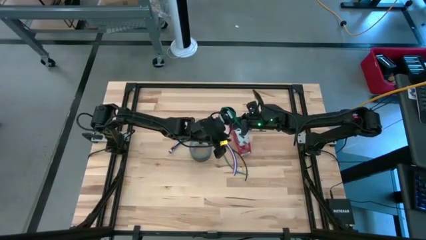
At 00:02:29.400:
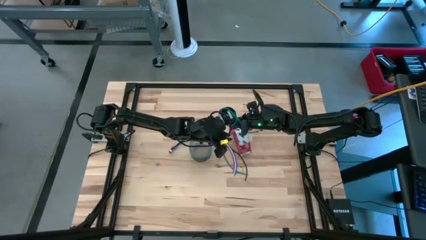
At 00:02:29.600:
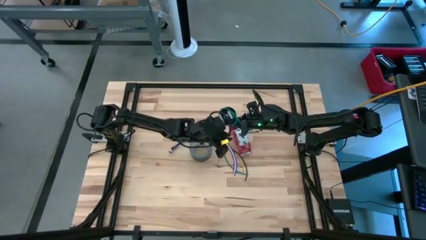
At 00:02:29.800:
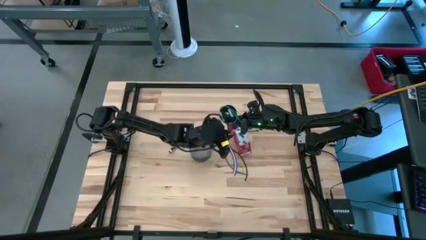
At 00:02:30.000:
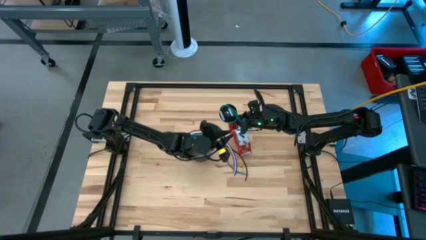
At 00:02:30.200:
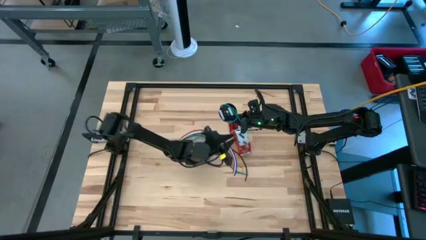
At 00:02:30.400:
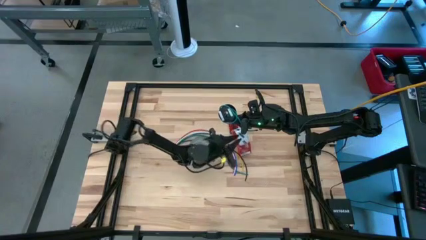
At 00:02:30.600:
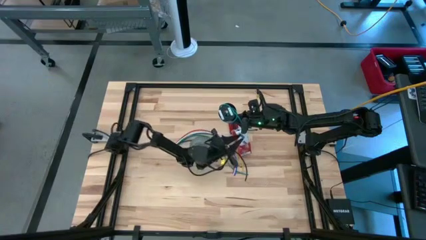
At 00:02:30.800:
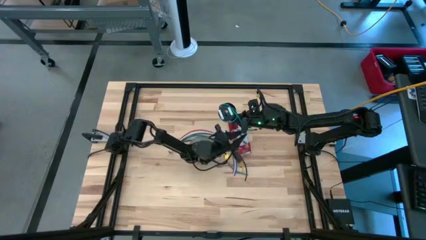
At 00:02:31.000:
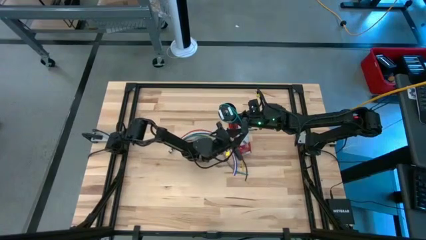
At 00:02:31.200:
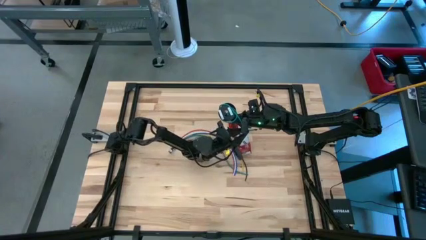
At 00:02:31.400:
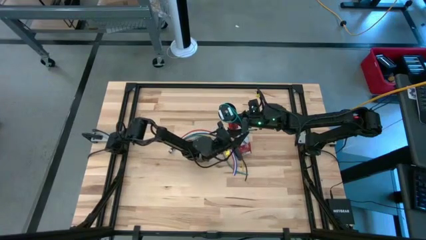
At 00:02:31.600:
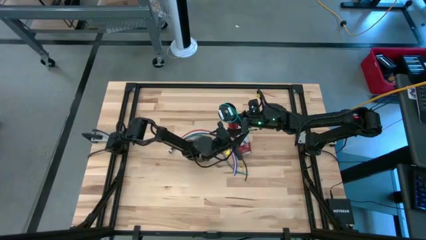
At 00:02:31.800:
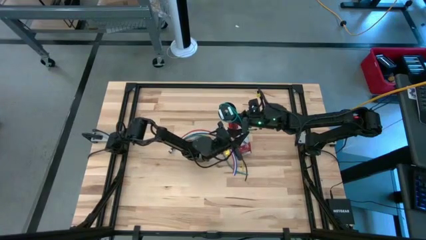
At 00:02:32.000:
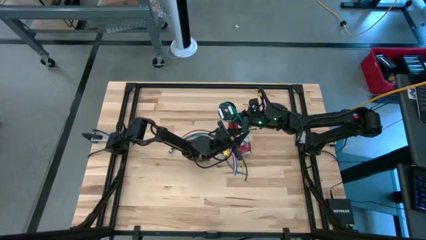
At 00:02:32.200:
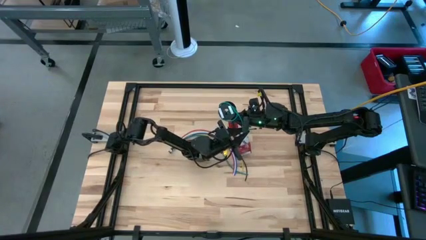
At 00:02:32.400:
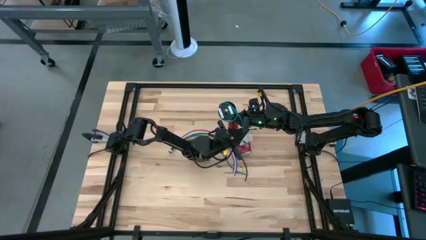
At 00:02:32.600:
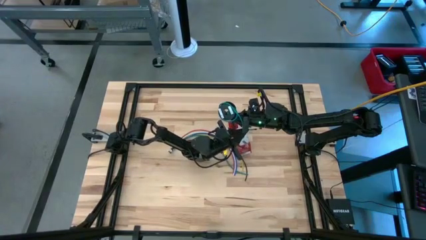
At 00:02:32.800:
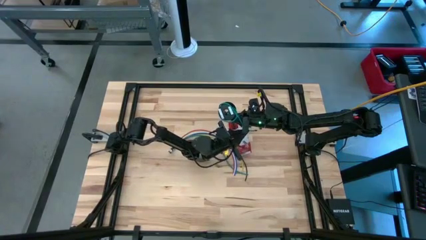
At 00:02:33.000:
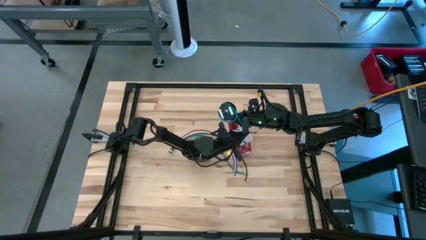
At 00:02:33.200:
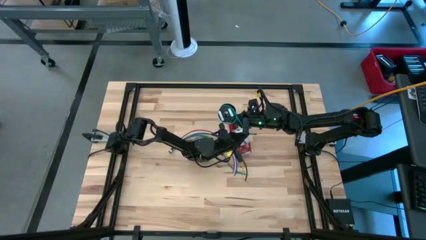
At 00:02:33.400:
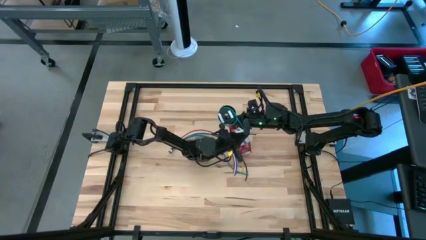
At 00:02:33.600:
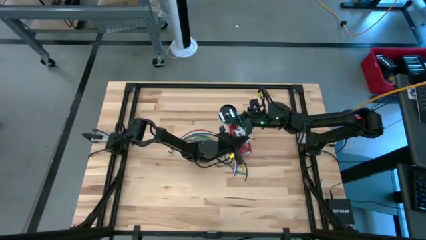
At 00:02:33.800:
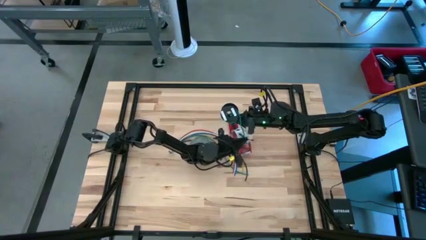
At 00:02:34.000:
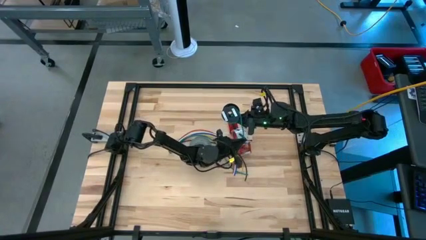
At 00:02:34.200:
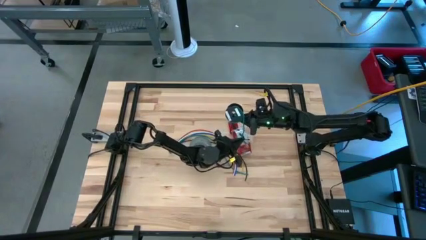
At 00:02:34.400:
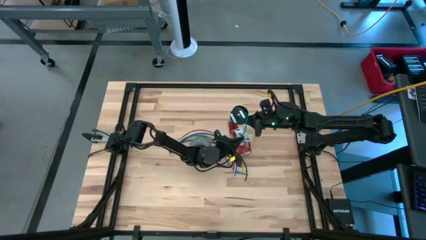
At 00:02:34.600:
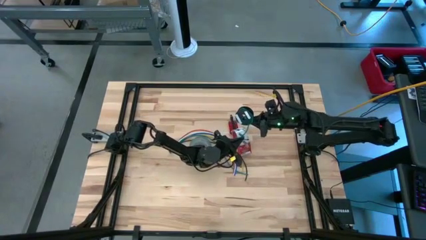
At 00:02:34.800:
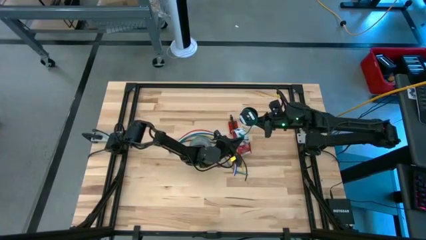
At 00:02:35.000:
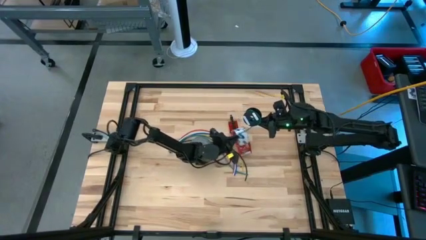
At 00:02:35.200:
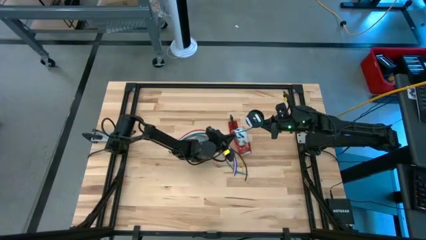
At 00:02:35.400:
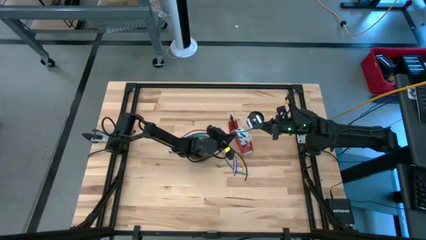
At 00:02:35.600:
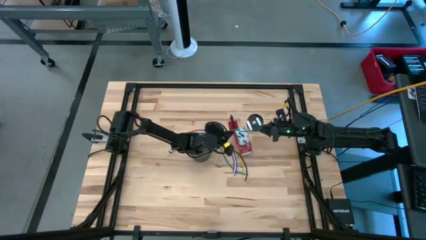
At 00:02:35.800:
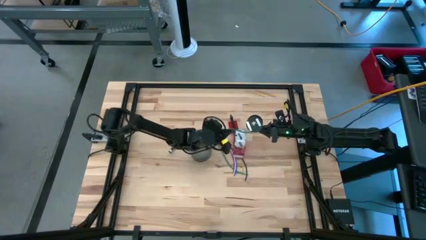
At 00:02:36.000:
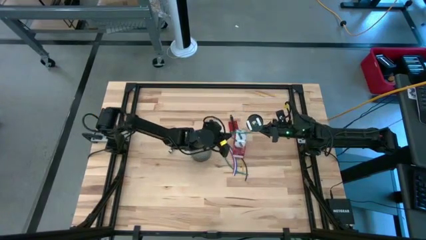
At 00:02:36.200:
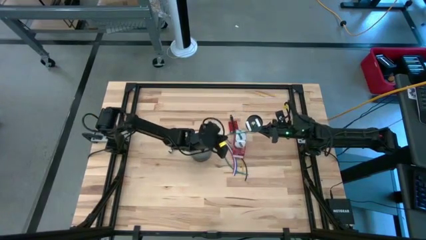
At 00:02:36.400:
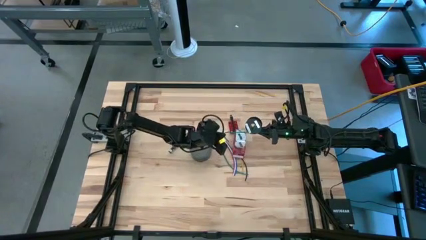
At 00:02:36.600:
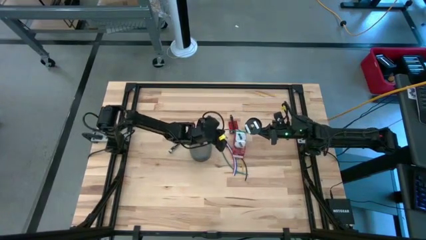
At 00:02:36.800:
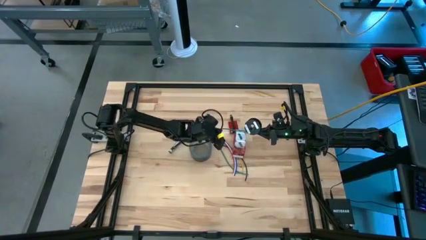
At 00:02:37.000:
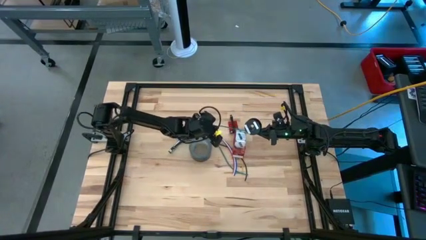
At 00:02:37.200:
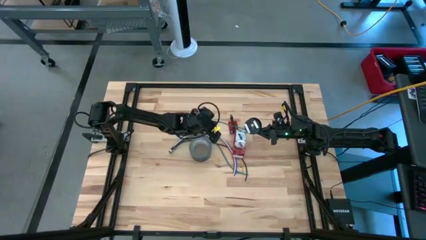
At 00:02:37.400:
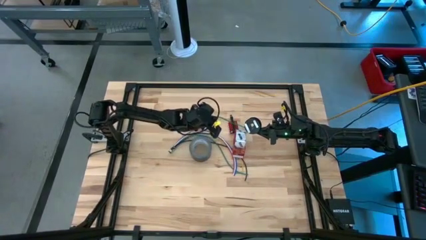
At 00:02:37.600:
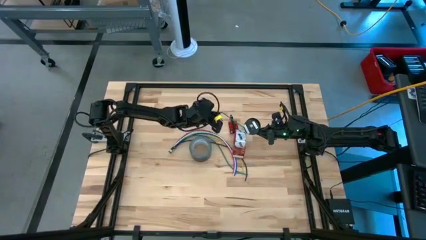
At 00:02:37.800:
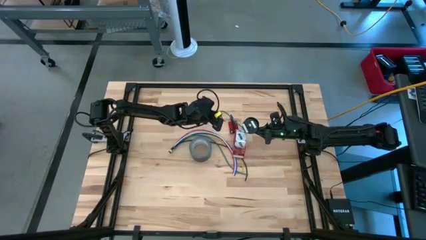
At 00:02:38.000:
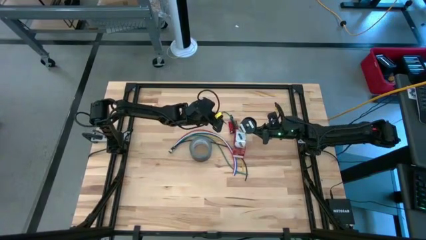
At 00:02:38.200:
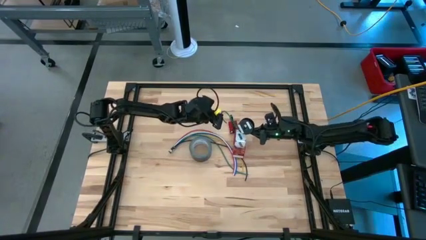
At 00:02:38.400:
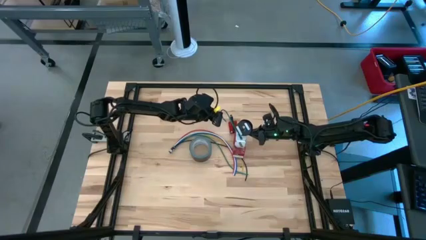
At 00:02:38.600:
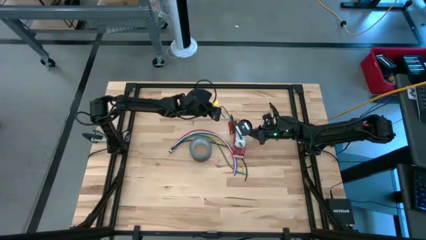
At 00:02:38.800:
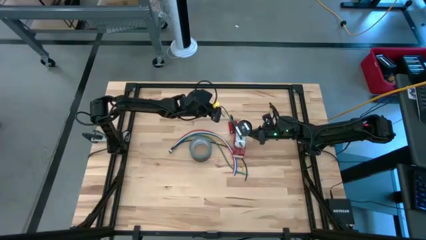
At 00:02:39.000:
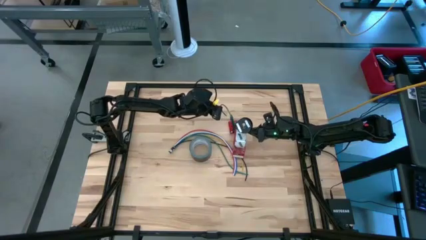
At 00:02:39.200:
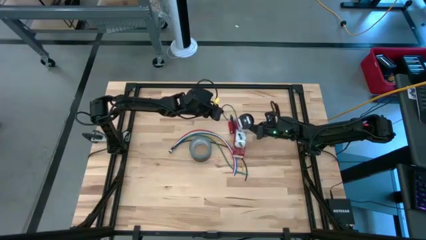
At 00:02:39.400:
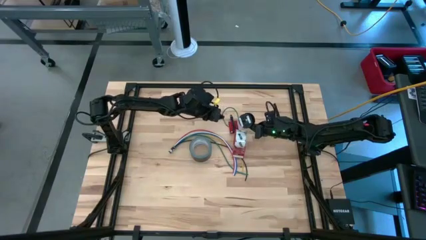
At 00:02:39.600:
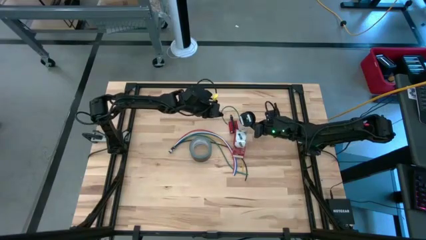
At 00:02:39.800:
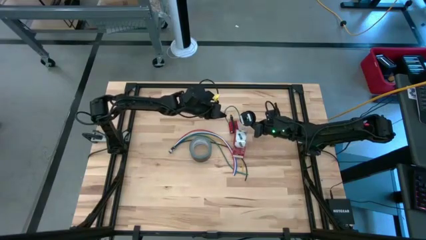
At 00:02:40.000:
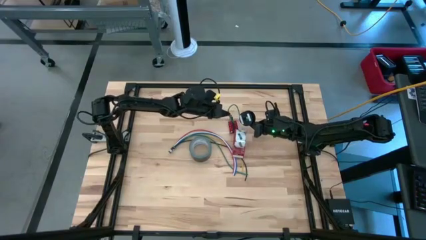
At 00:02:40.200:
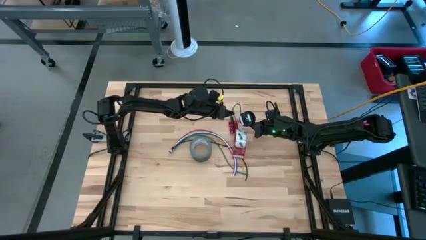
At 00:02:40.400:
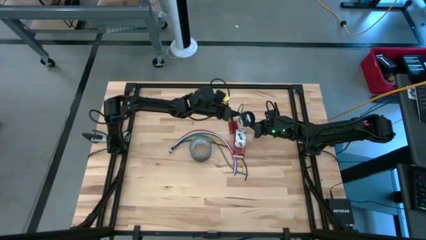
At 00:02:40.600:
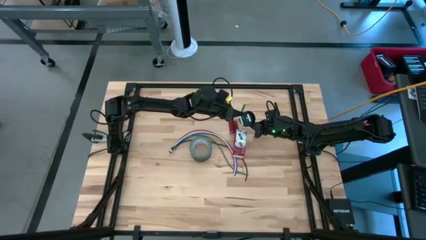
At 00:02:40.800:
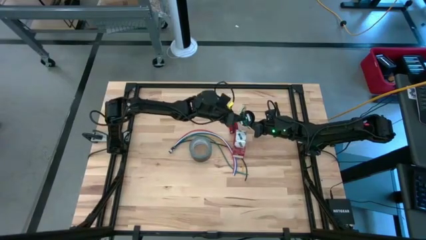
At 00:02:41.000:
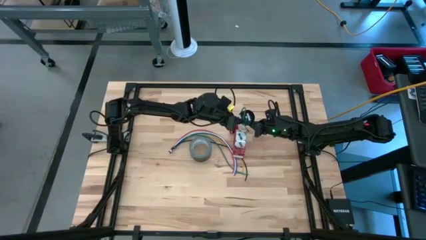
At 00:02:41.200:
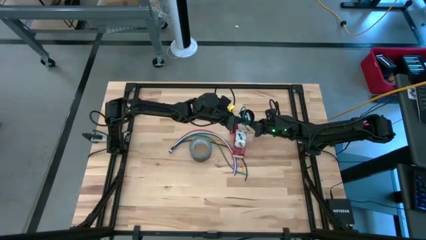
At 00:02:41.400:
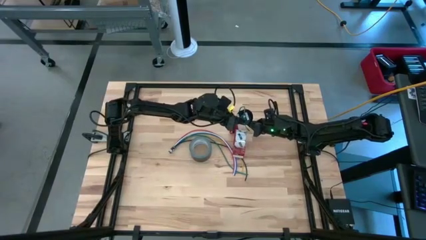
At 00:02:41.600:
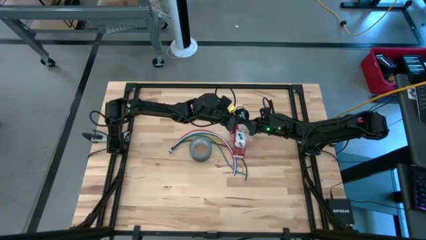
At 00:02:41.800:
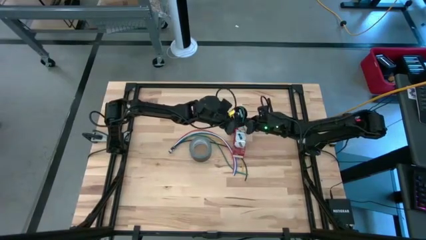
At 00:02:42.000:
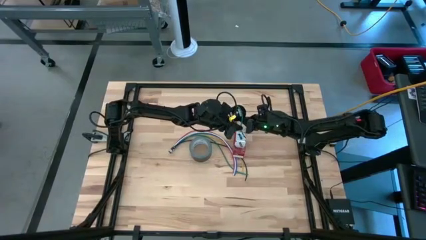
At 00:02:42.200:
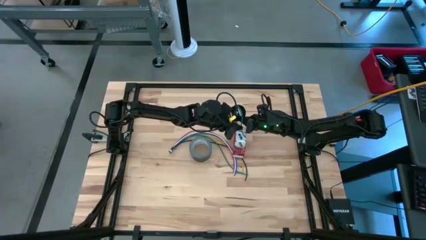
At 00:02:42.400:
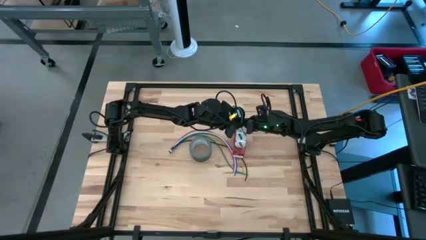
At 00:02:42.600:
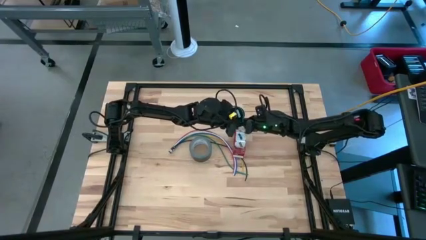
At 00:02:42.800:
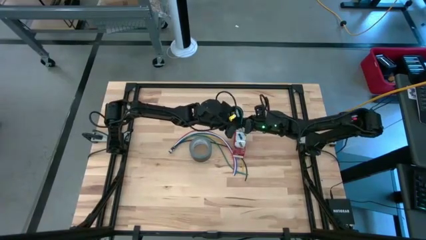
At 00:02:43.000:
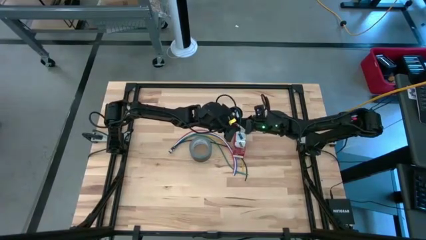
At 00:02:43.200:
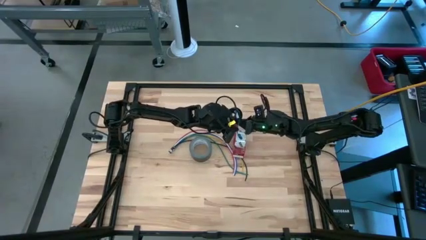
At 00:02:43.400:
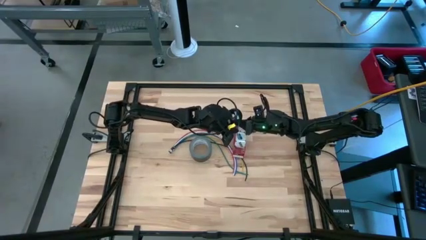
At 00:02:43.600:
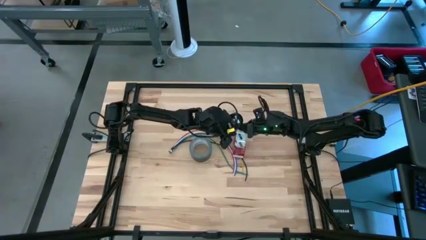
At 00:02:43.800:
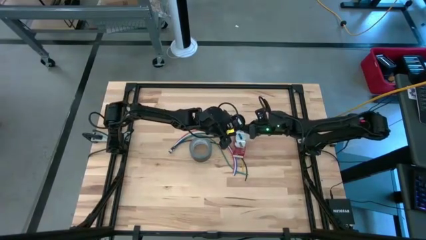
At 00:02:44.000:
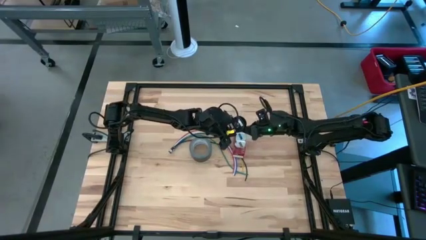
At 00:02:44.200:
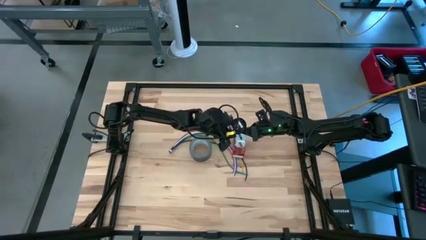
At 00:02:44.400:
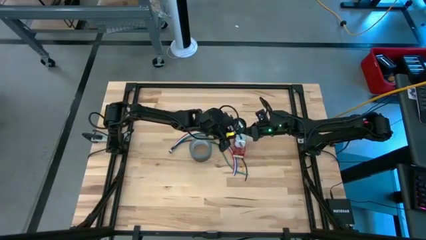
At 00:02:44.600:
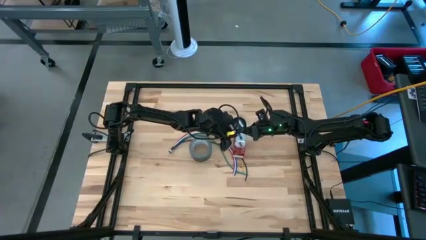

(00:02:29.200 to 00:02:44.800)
Task: Coil cords
Coil the green wire into the spool

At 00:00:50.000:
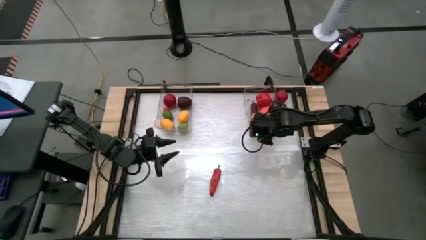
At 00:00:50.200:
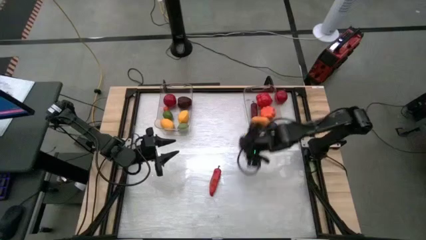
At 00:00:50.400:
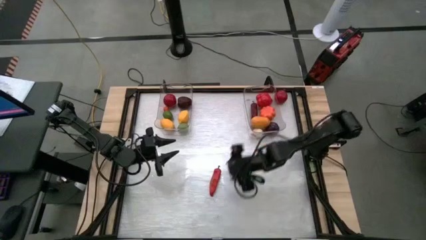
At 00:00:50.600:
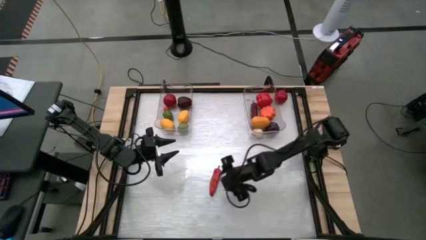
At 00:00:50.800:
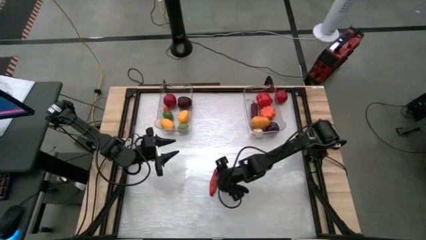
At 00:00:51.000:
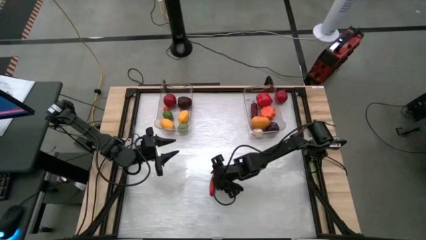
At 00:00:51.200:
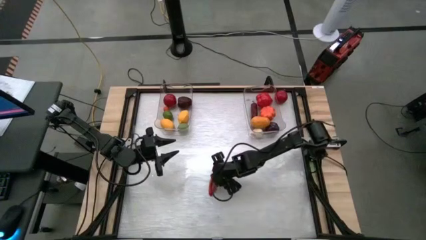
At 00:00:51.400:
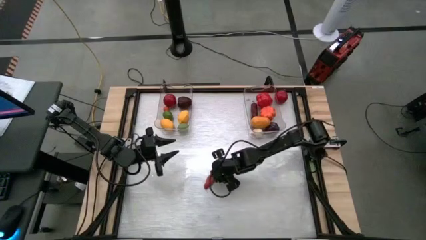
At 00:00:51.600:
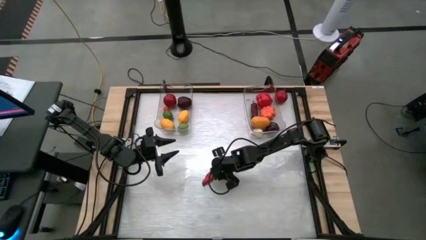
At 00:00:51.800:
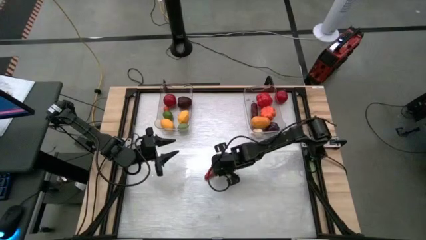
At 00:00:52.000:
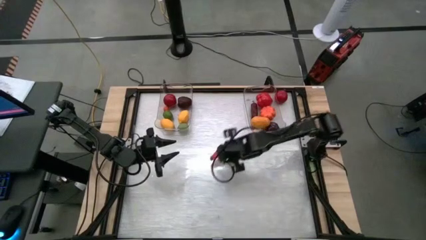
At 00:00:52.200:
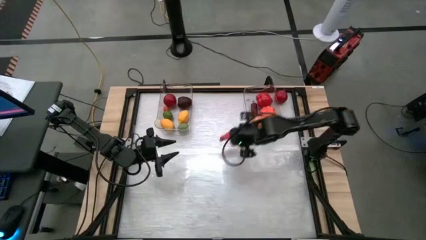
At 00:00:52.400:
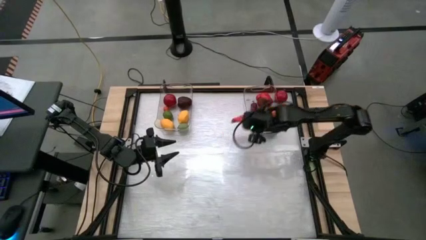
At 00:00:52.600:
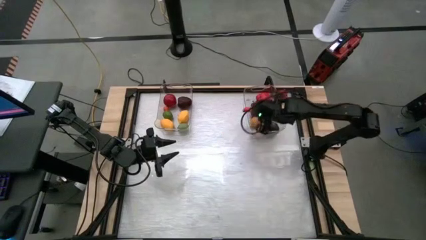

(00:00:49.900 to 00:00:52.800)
Task: Sort produce into baskets
Put the red chili pepper into the right transparent bin
